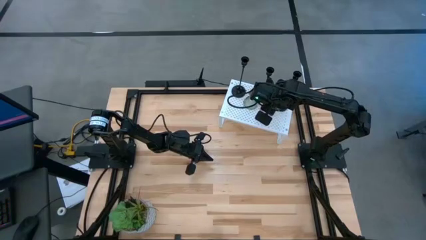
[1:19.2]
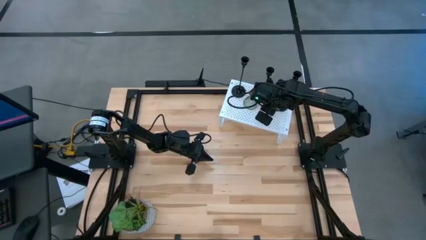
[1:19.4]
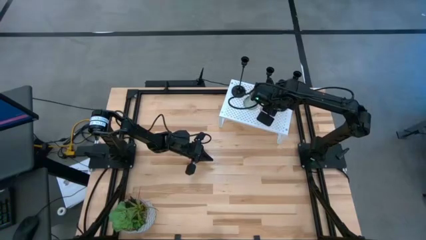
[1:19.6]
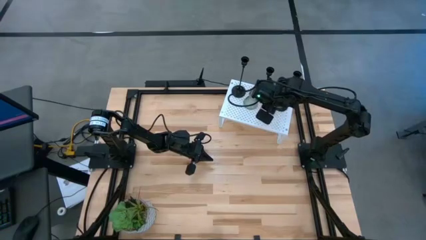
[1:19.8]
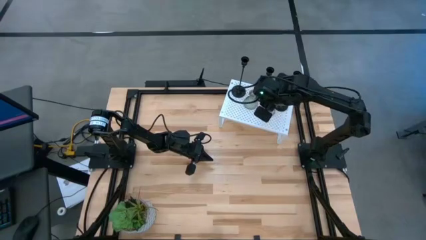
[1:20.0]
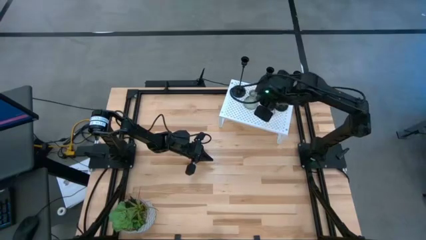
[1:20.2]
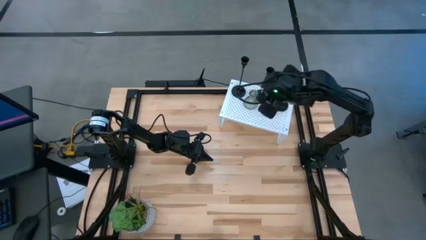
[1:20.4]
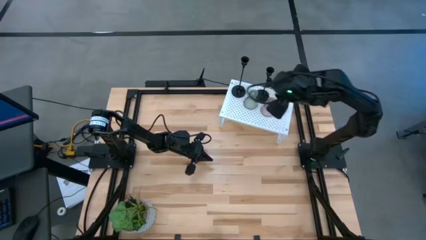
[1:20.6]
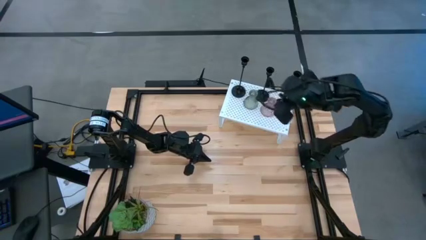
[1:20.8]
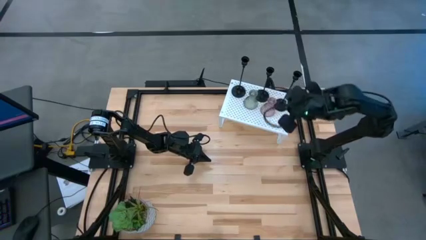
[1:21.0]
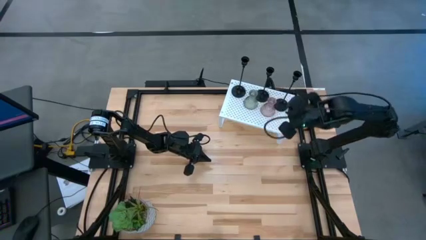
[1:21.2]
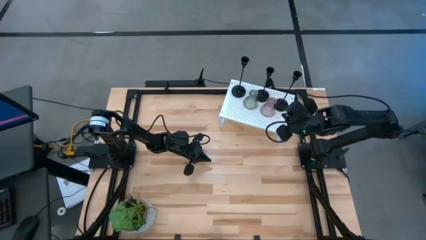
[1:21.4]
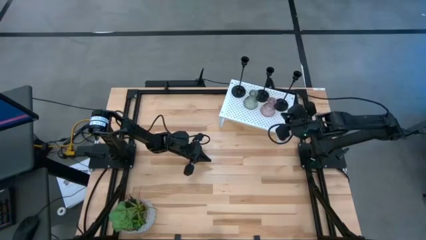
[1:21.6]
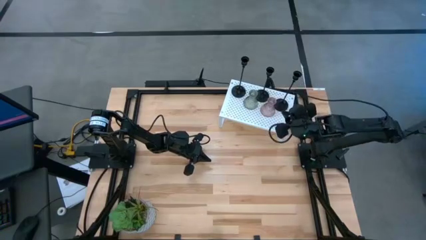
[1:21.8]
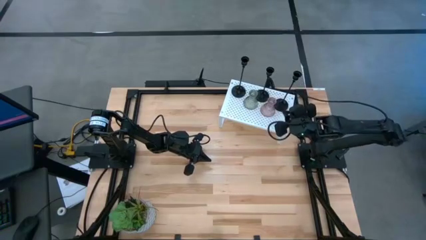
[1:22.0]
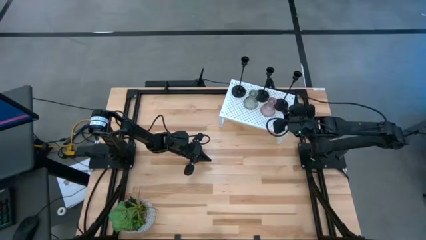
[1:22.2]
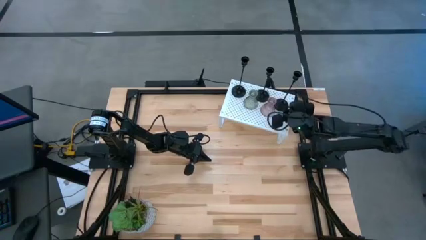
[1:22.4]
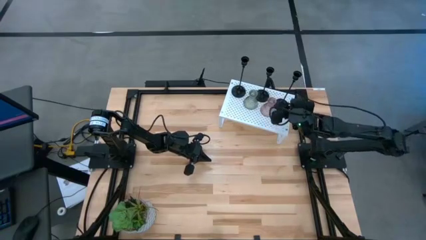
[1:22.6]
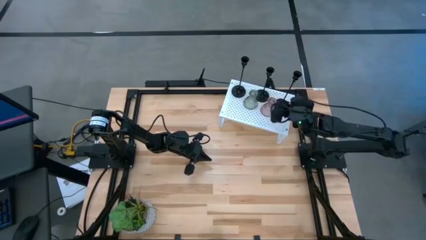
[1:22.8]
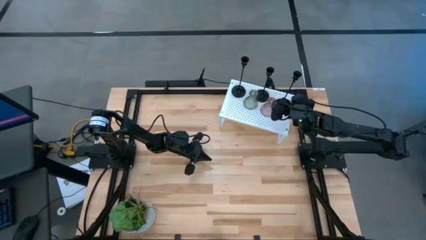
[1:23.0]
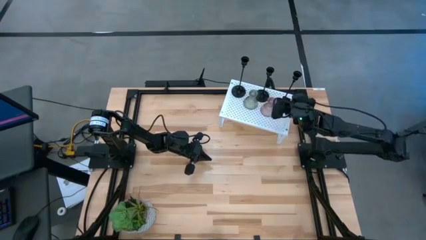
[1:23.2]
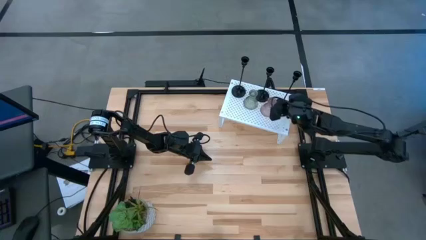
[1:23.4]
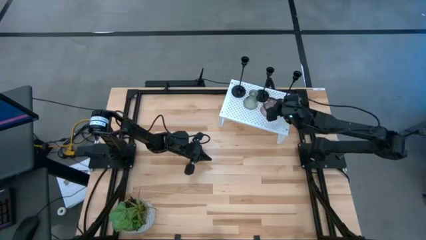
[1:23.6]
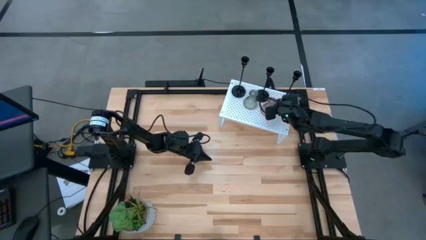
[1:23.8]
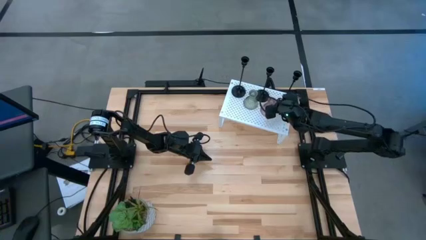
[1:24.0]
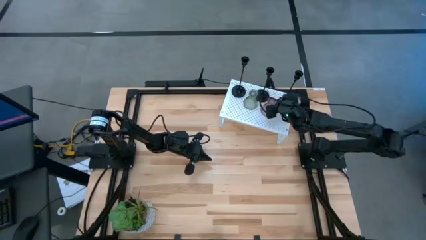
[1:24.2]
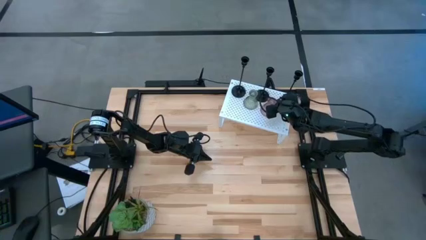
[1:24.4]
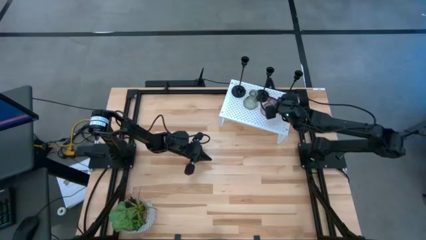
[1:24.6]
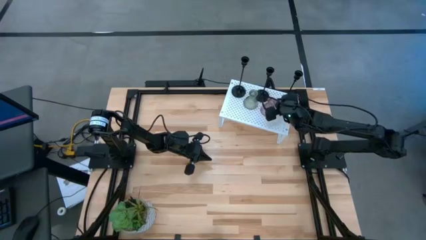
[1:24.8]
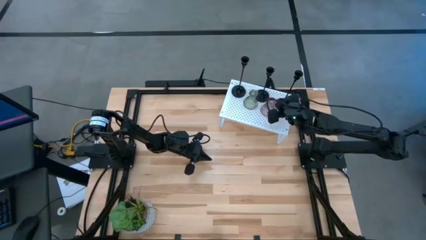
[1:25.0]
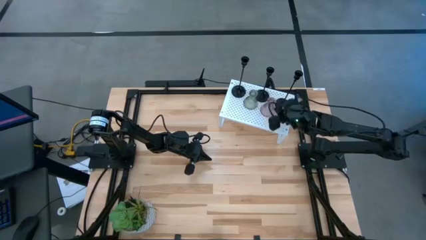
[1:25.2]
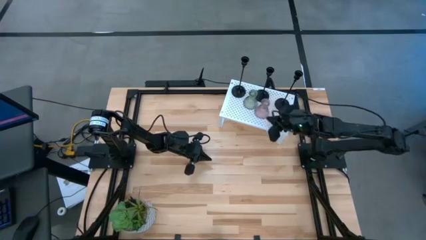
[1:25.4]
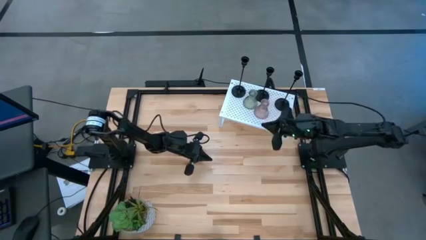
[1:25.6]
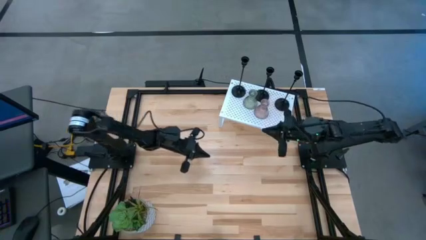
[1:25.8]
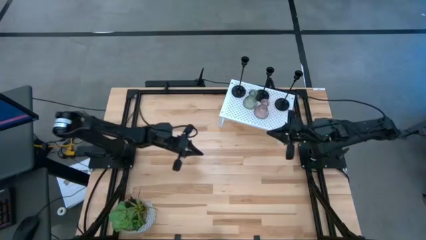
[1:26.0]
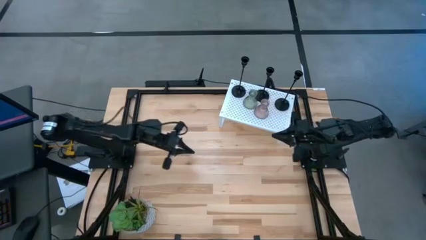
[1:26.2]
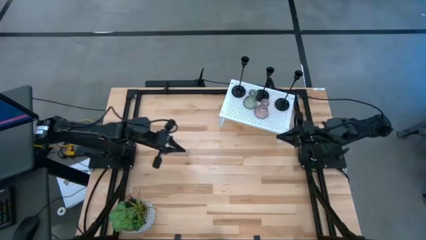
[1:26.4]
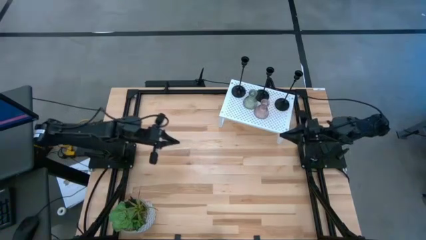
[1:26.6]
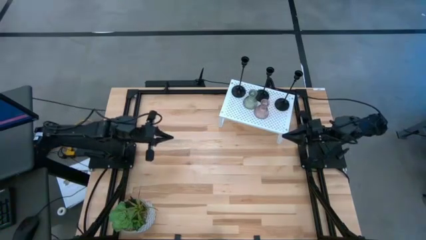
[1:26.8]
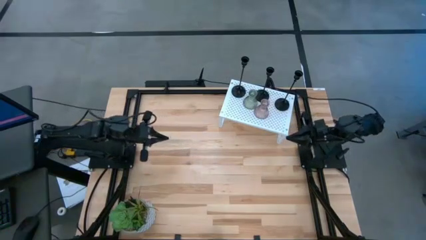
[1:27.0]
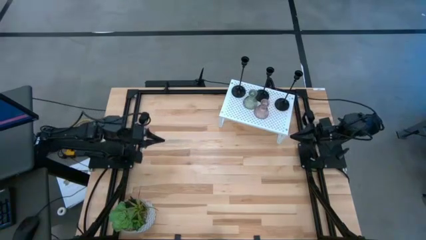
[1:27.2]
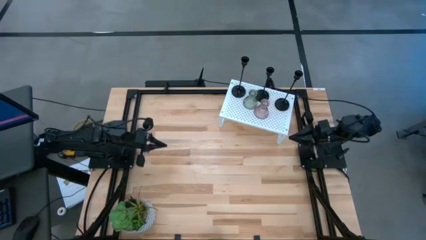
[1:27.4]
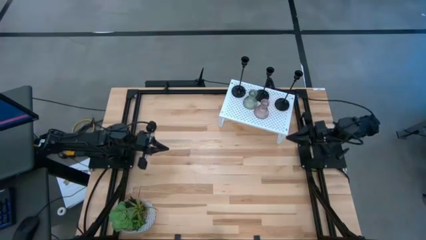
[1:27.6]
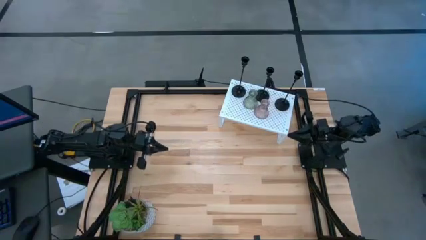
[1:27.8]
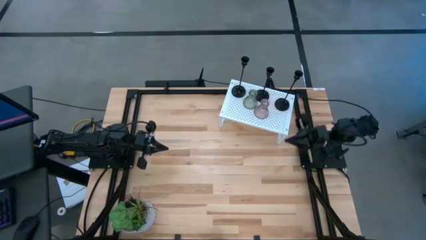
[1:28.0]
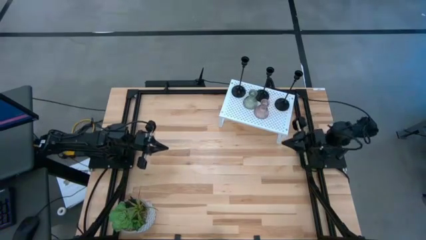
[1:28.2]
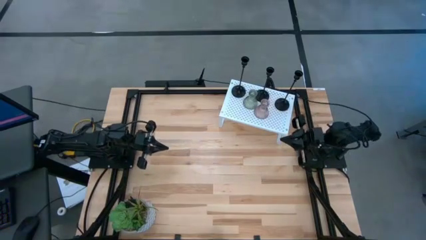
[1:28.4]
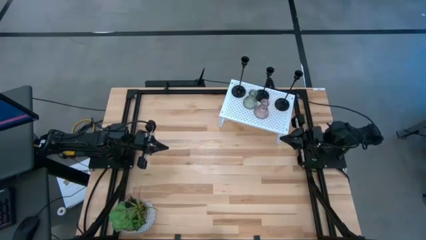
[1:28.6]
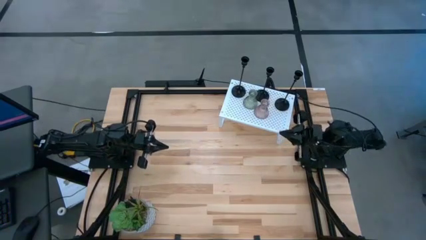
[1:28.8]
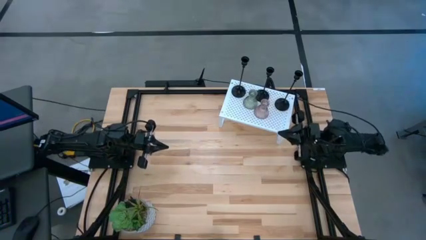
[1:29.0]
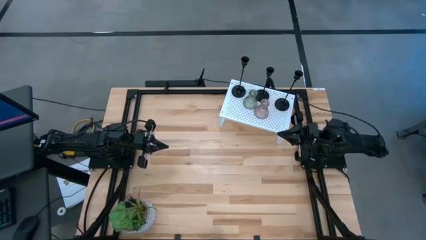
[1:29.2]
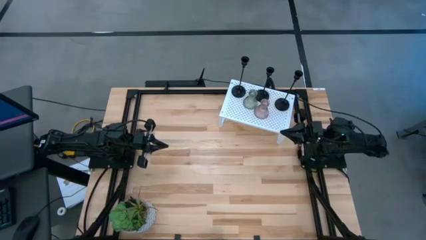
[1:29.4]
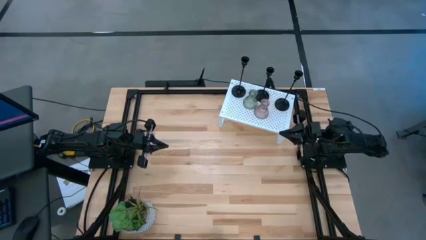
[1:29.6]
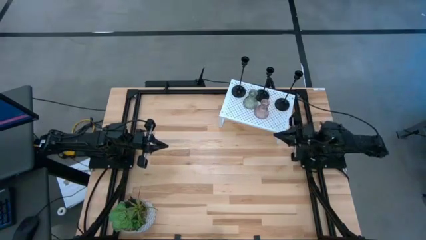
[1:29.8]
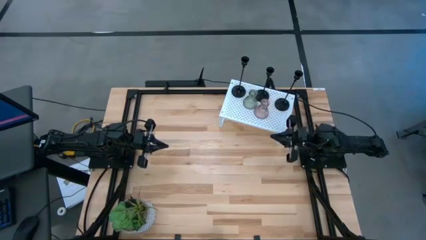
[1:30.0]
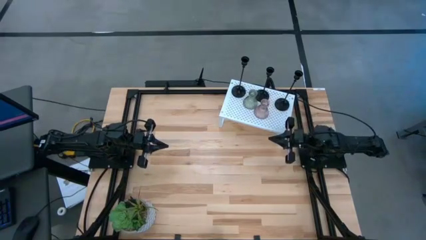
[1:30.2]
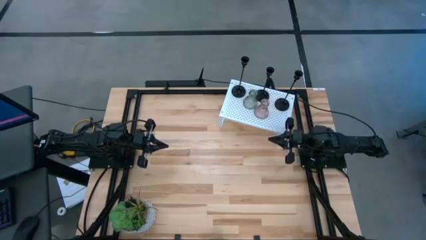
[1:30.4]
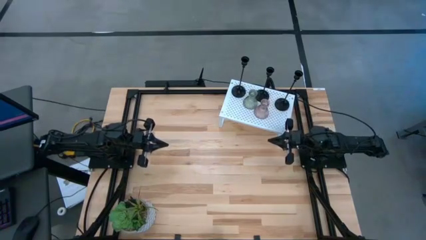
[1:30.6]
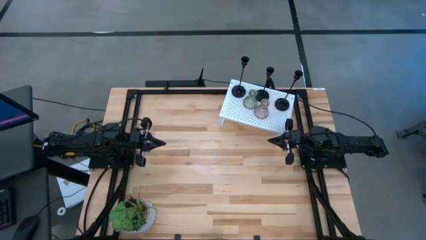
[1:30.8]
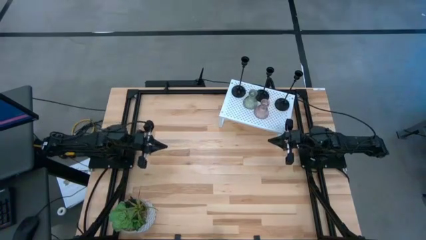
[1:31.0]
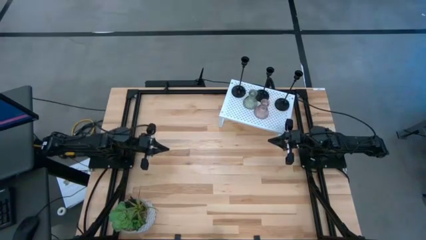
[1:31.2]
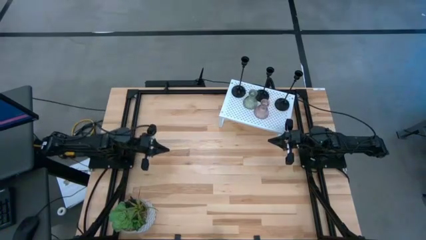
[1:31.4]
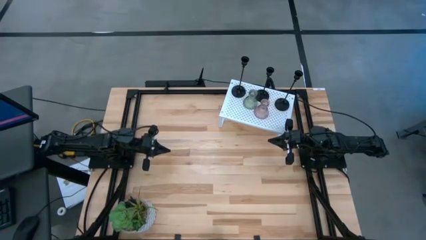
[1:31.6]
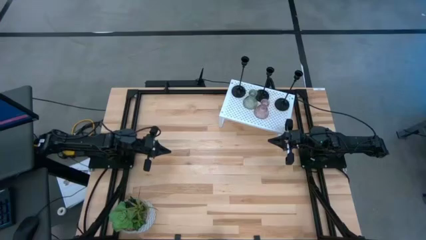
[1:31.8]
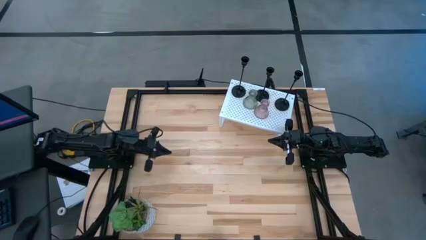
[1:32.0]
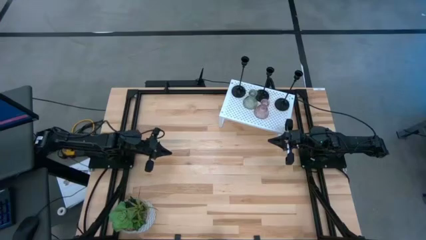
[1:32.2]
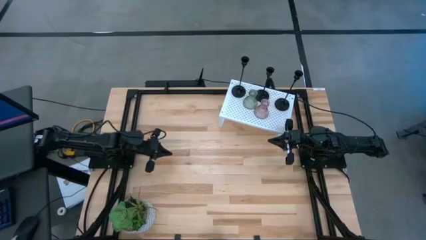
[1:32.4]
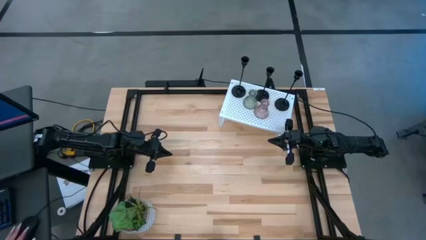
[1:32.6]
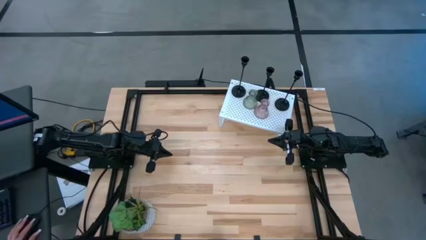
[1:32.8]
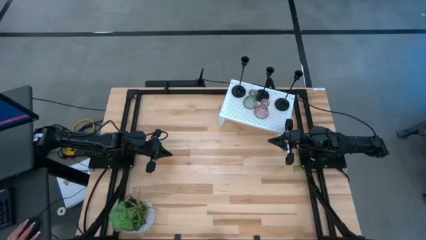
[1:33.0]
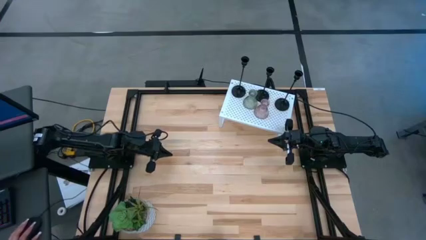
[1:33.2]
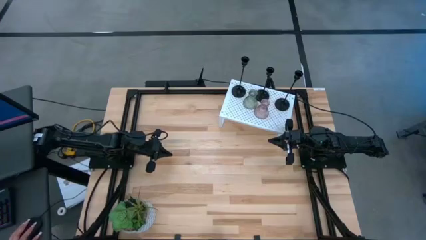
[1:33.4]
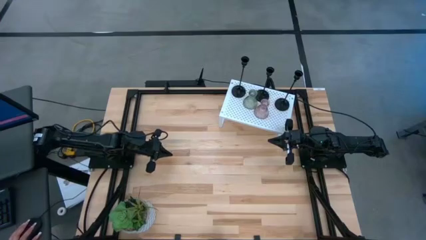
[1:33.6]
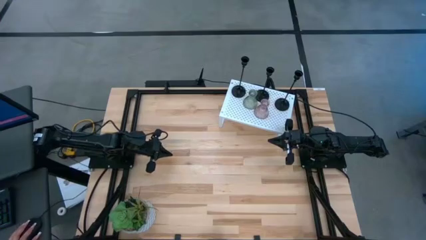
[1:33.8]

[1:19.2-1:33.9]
Task: Pick & Place candle stick holders
Return to Home Position
